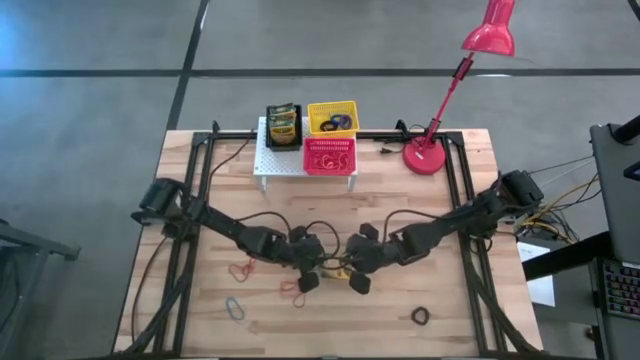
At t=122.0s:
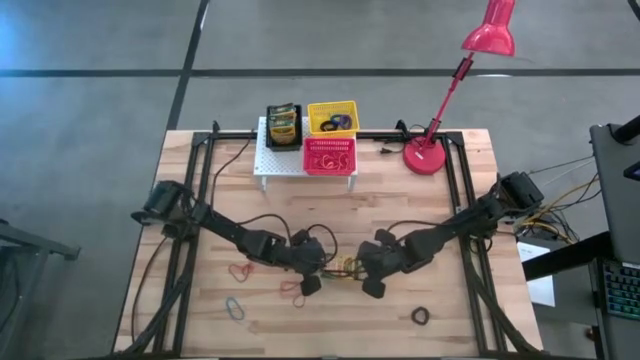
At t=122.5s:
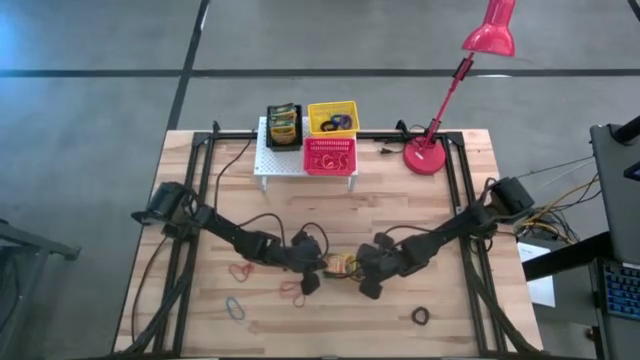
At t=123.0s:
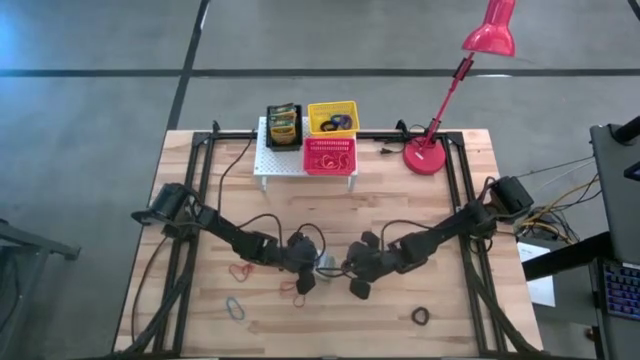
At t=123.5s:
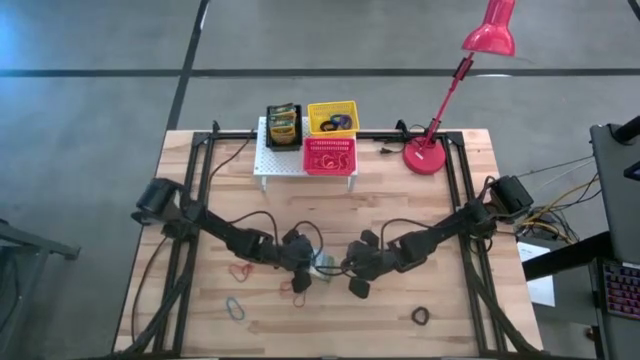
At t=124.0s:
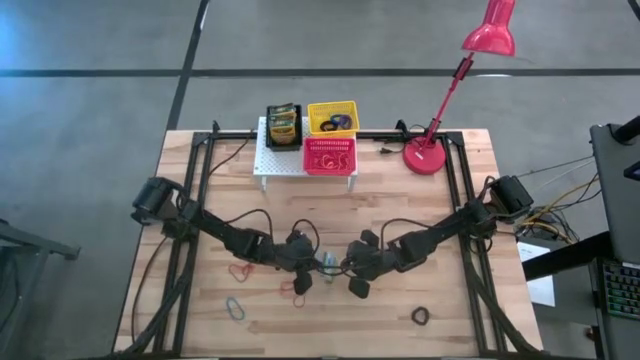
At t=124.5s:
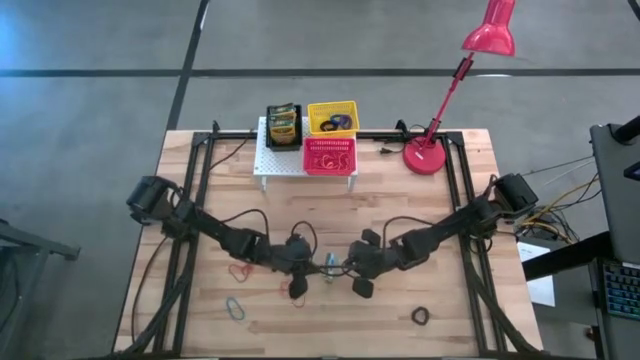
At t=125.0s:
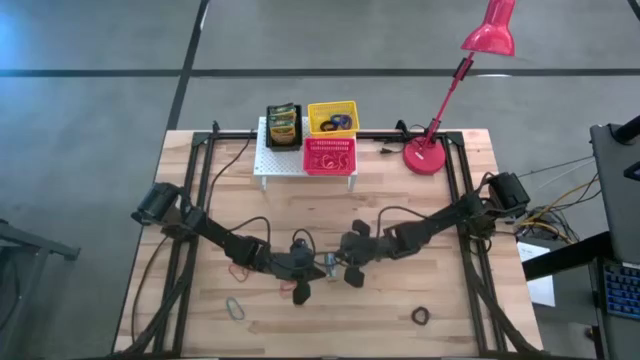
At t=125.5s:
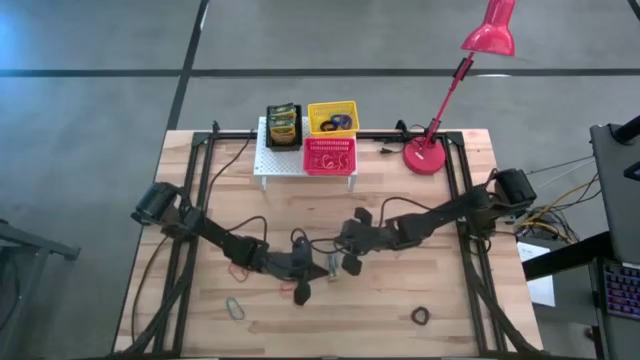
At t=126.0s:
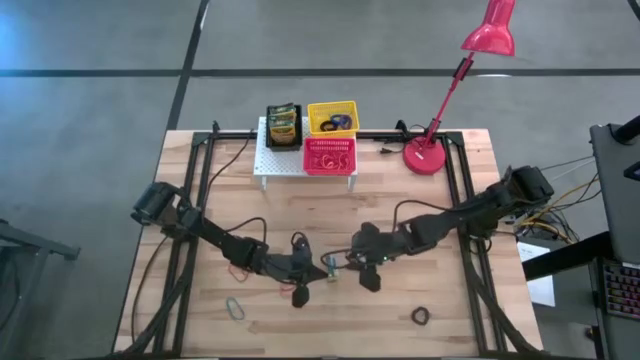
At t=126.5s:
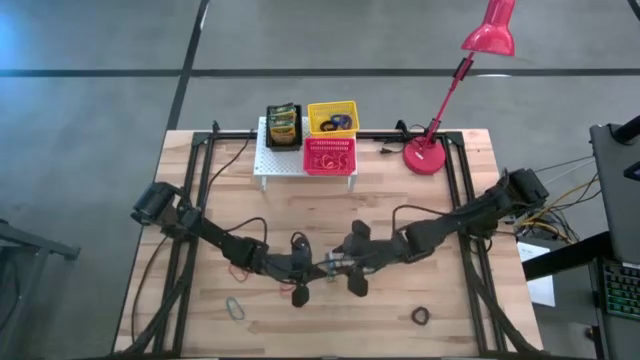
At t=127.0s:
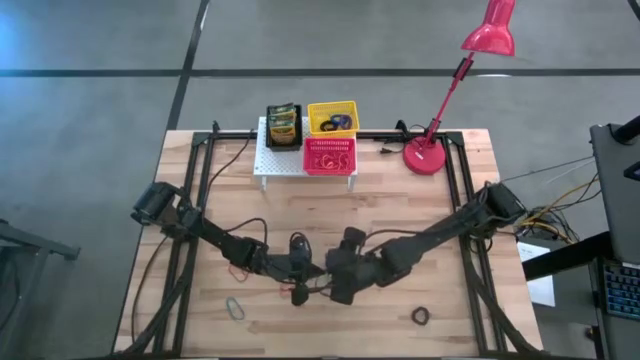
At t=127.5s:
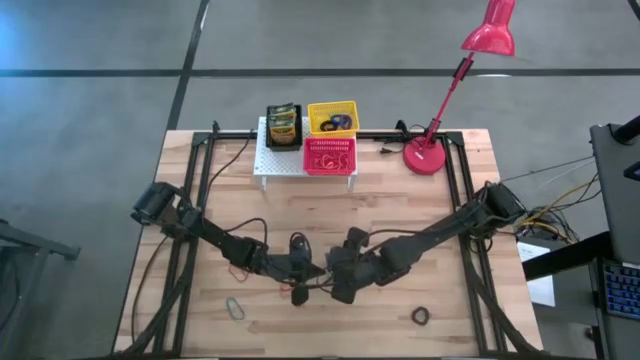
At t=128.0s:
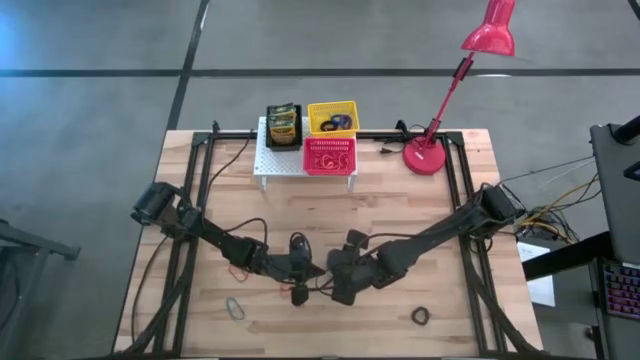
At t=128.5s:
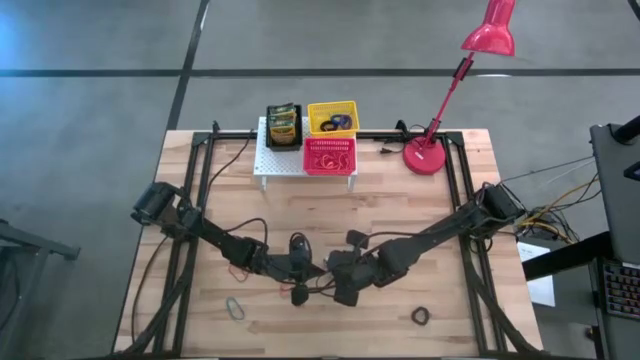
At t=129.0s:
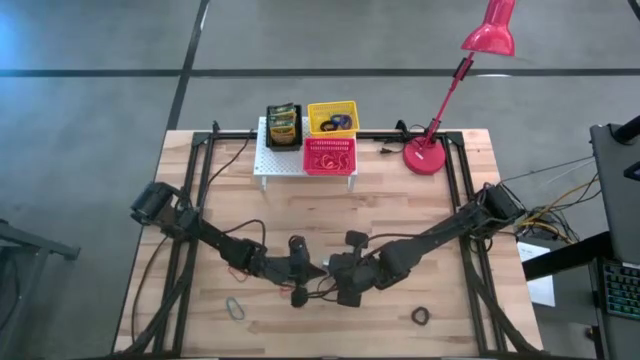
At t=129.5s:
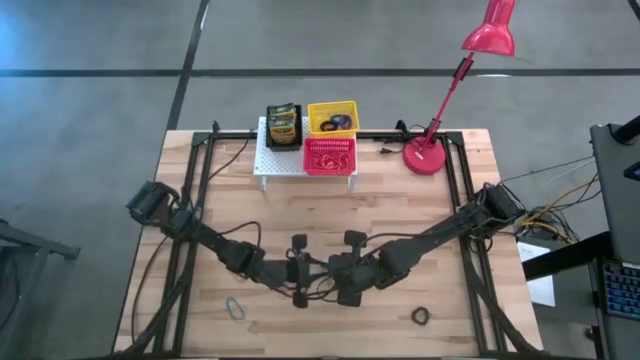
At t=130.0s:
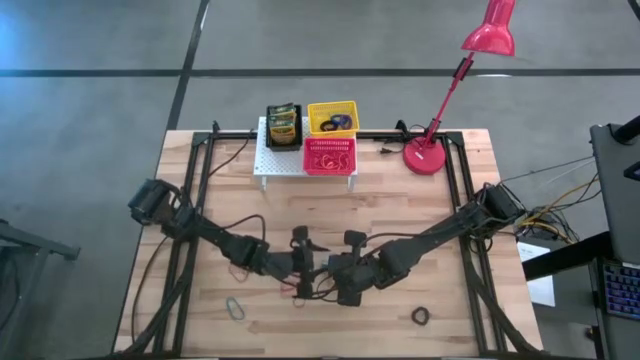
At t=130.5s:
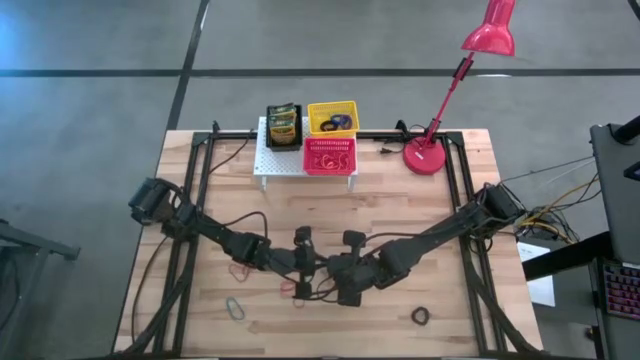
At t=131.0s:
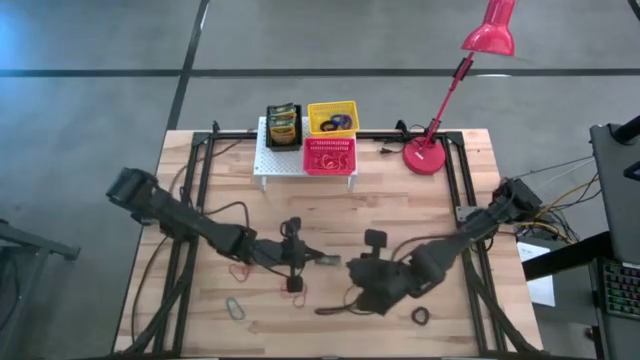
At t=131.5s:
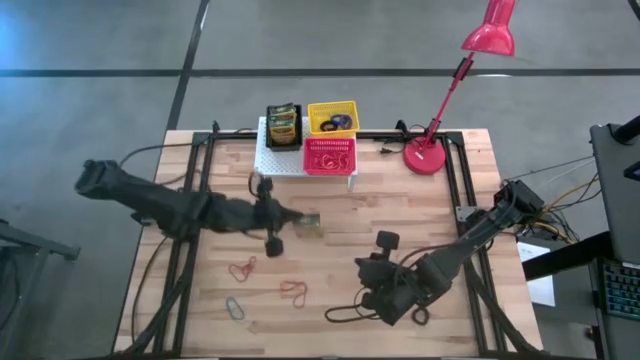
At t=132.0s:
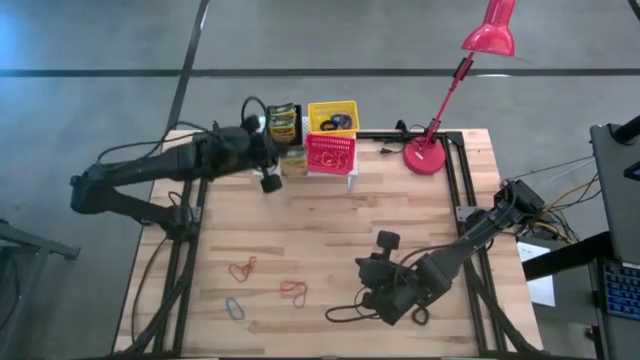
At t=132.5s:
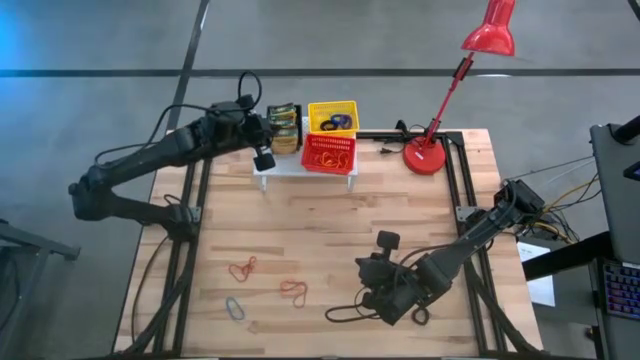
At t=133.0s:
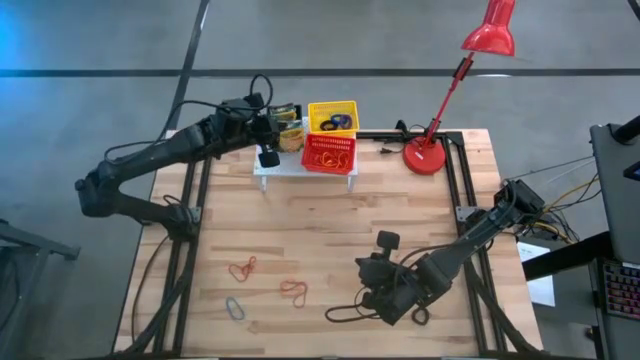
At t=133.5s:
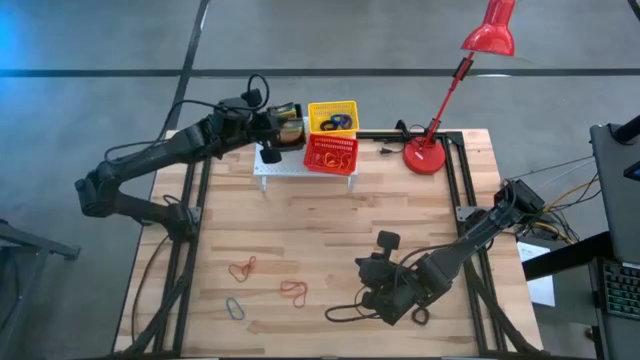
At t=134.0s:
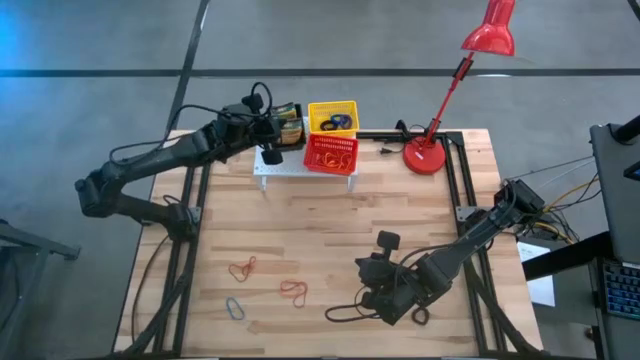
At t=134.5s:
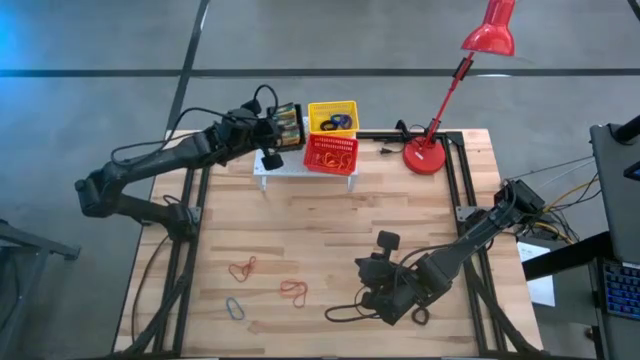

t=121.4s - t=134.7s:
Task: Pick & Place Office Desk Supplies
Put the crayon box into the black bin on the shelf

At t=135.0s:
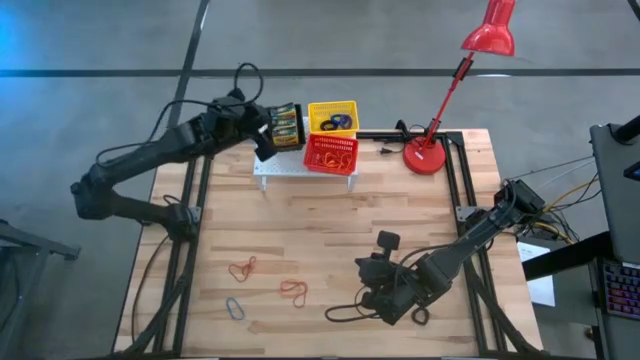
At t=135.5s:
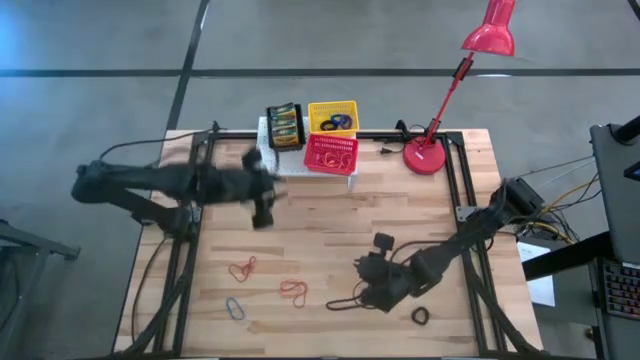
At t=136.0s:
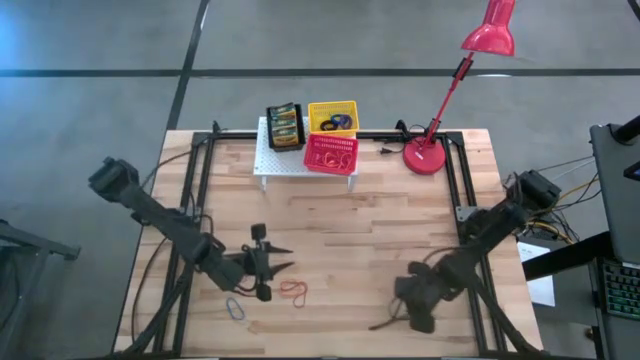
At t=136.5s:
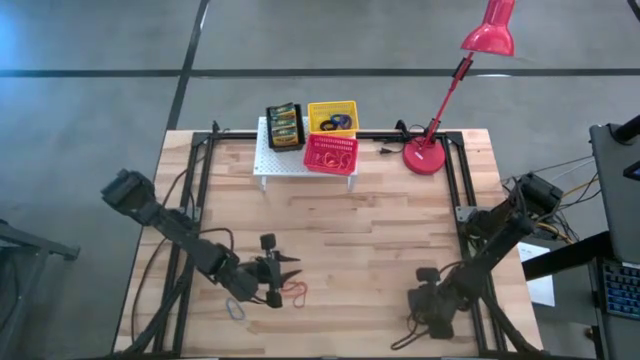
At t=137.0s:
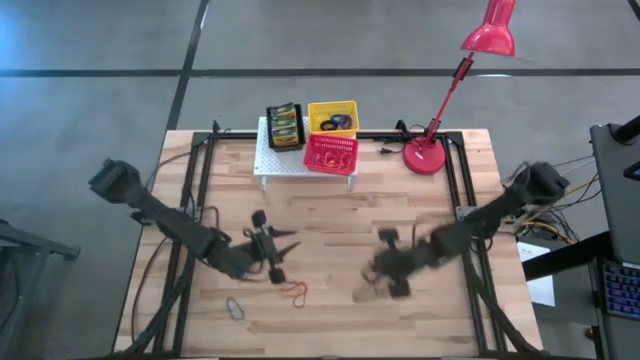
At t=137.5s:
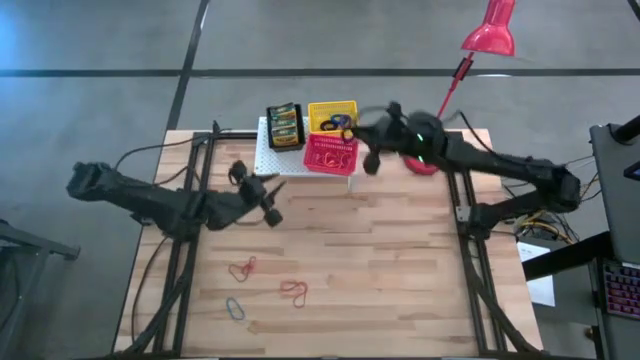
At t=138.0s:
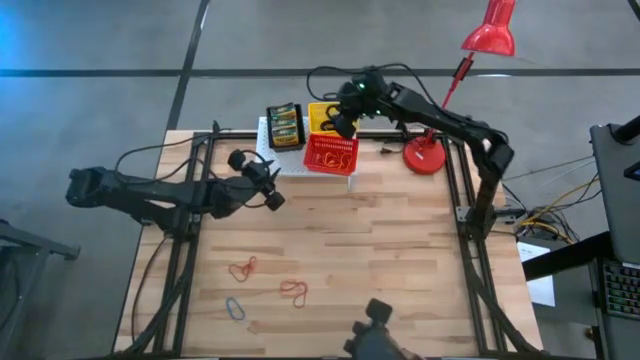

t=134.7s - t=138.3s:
Put the black spring keychain into the yellow bin on the shelf

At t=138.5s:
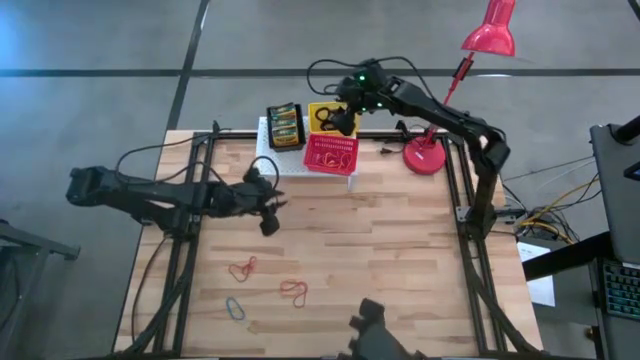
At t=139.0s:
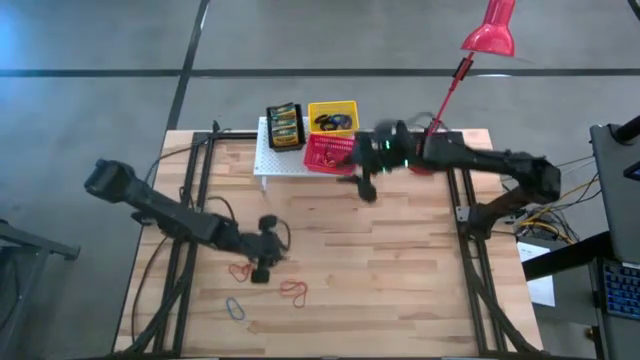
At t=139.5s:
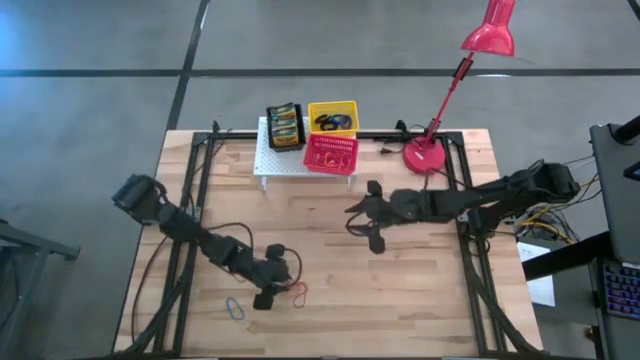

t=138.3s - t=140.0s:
Put the orange rubber band into the red bin on the shelf

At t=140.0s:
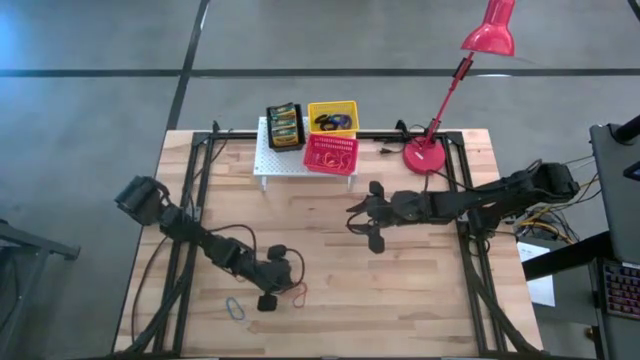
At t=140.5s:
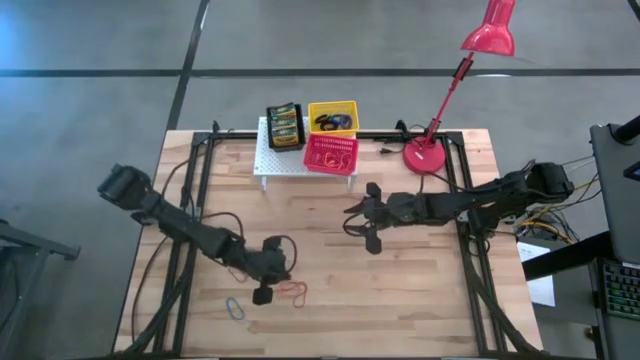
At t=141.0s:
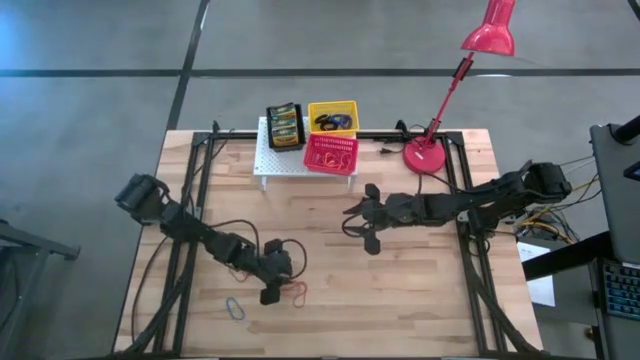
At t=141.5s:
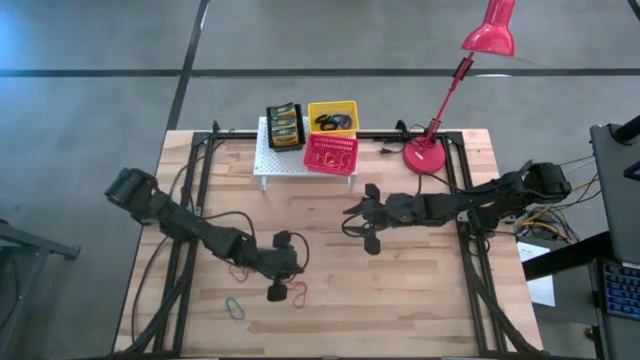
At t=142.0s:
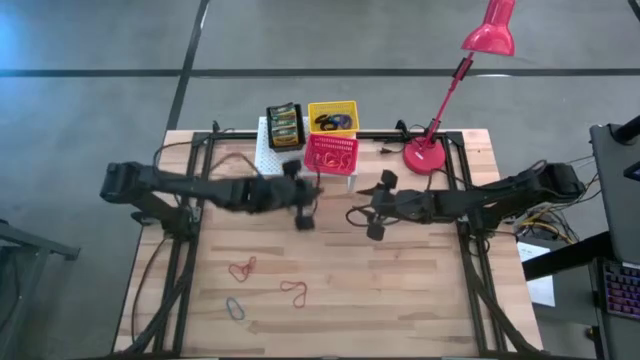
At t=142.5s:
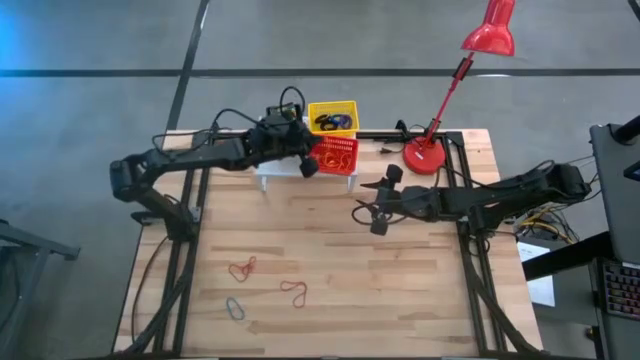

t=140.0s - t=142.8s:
Put the orange rubber band into the red bin on the shelf
